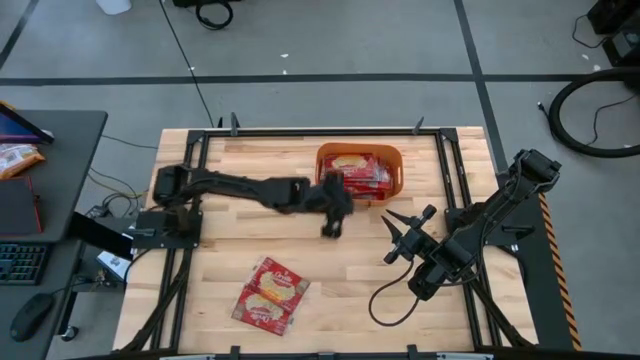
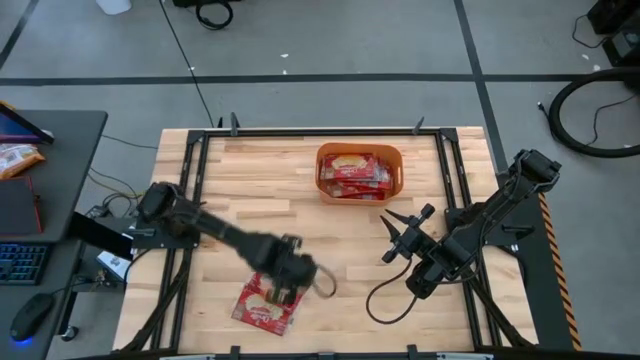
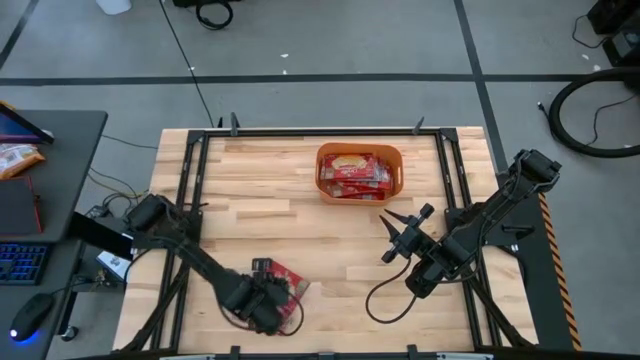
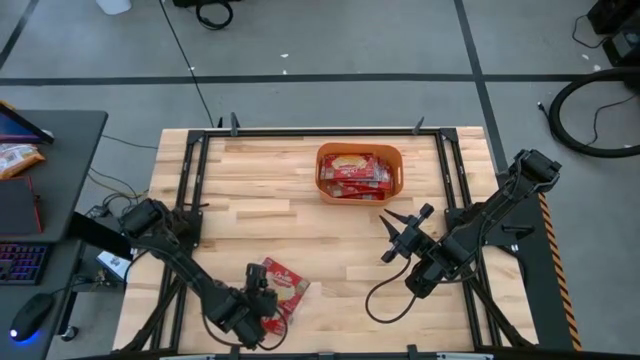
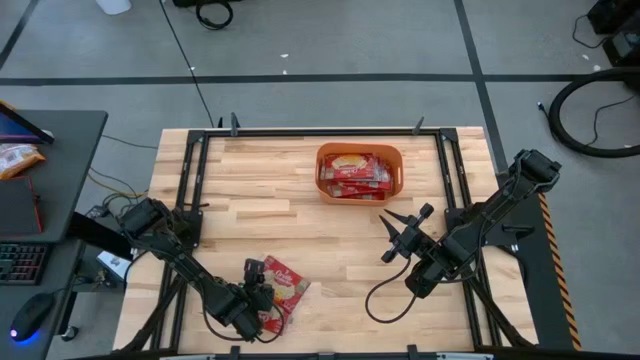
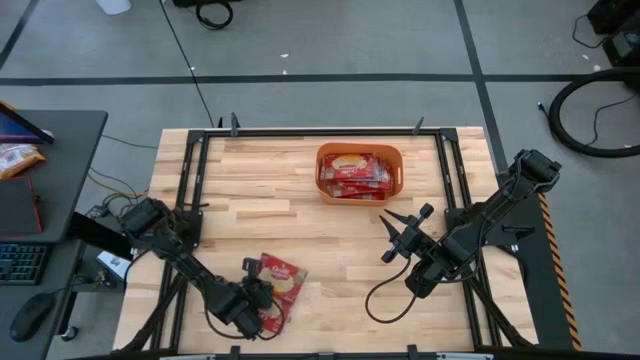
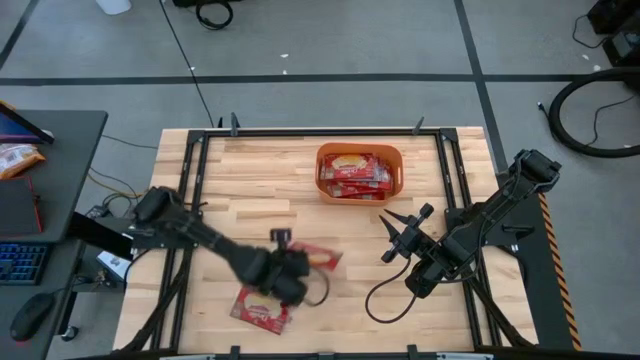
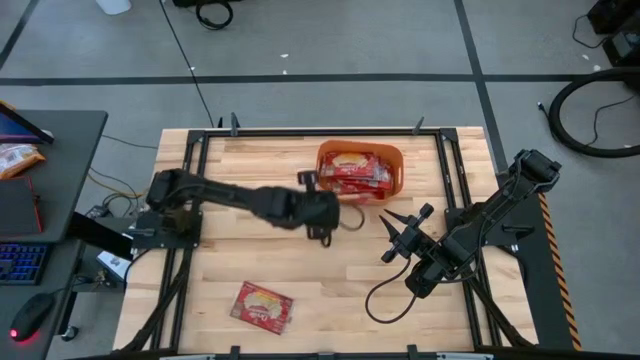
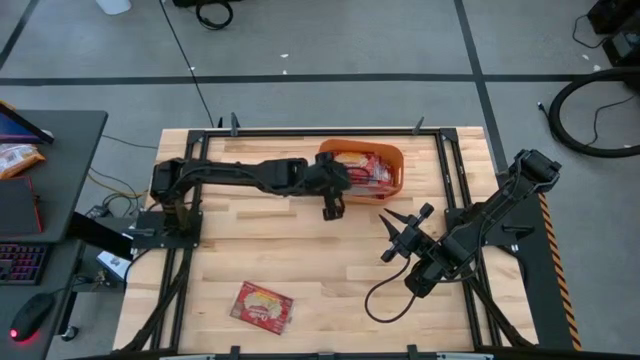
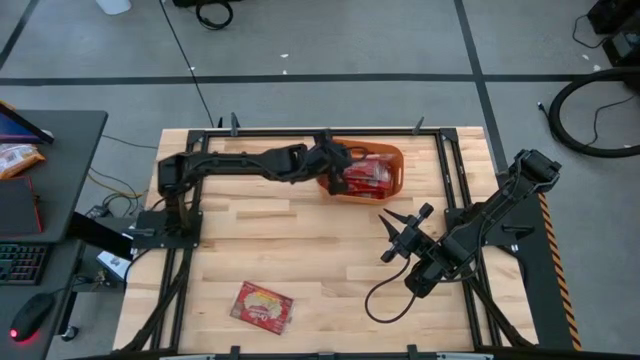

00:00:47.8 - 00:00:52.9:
Task: Sort popcorn bags into baskets
Put the red popcorn bag into the orange bin

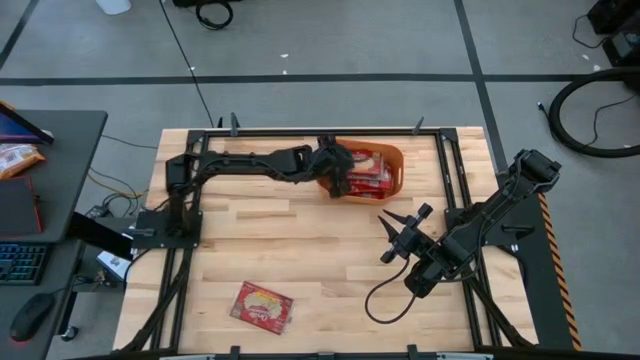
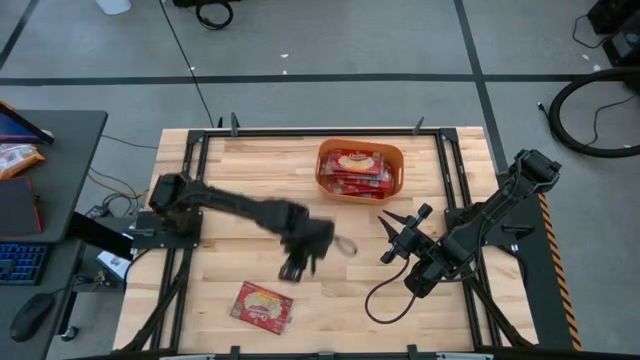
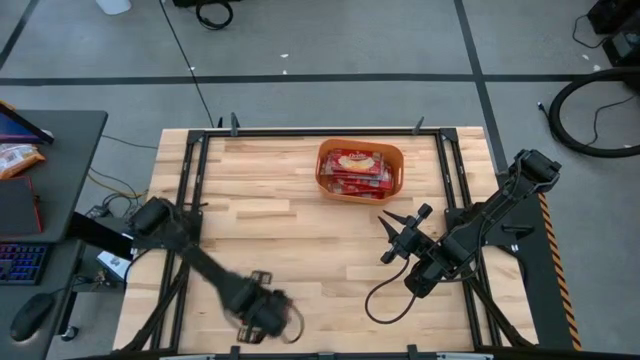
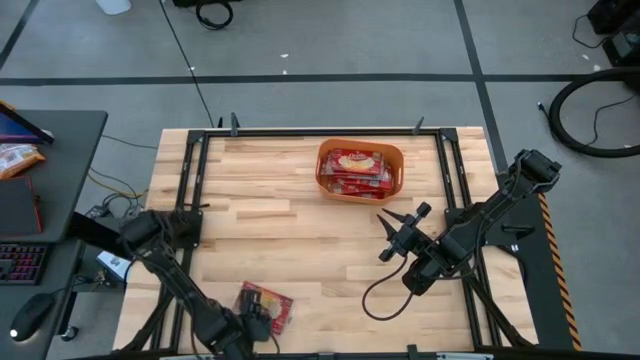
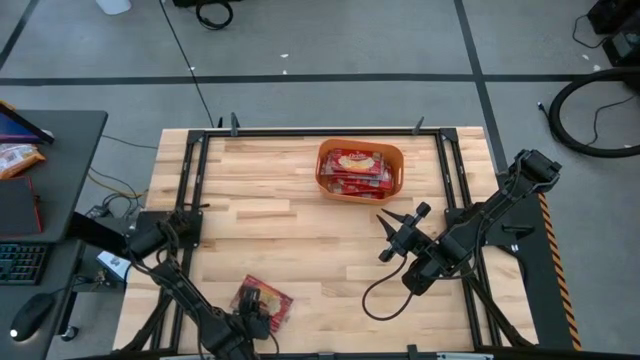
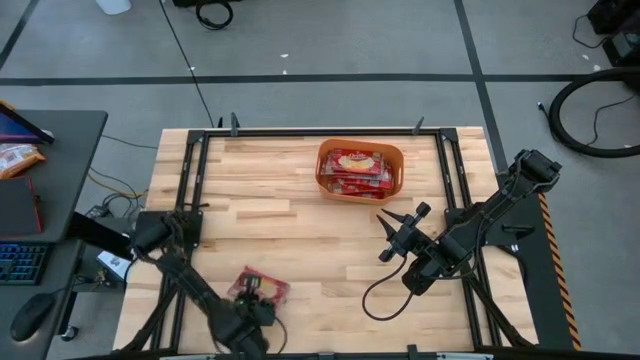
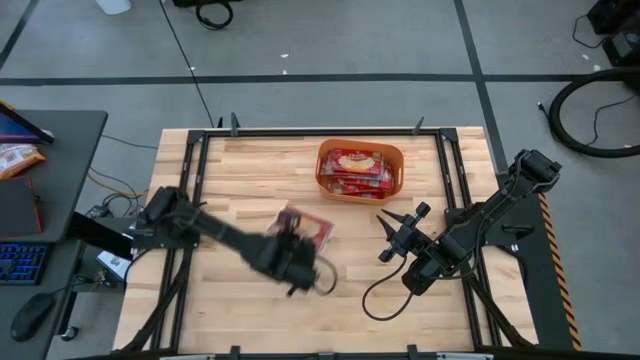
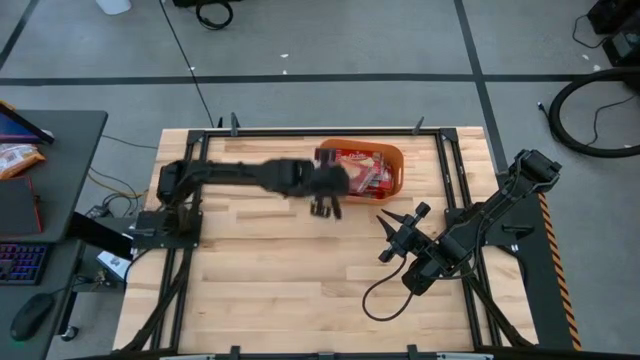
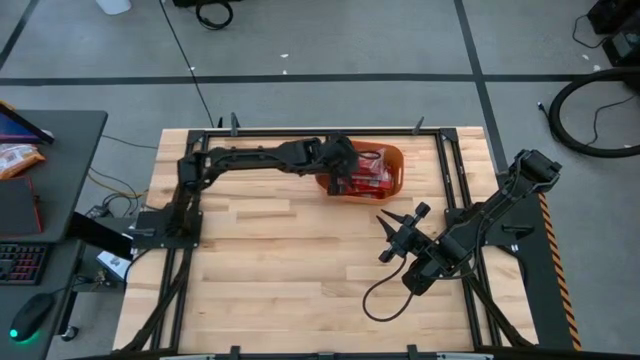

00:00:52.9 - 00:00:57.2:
Put the red popcorn bag into the orange bin

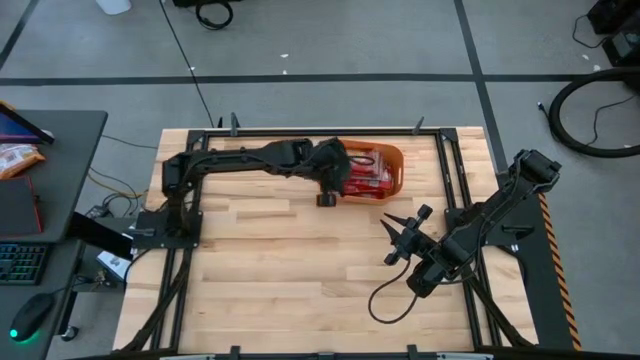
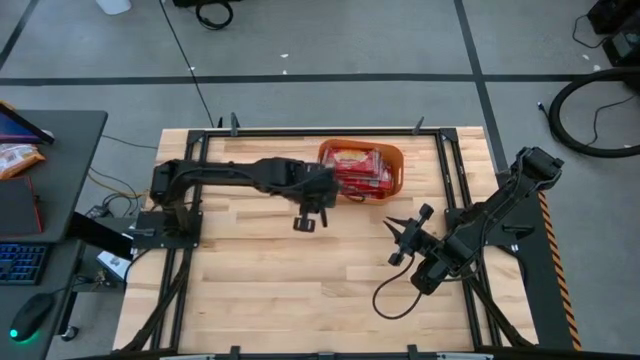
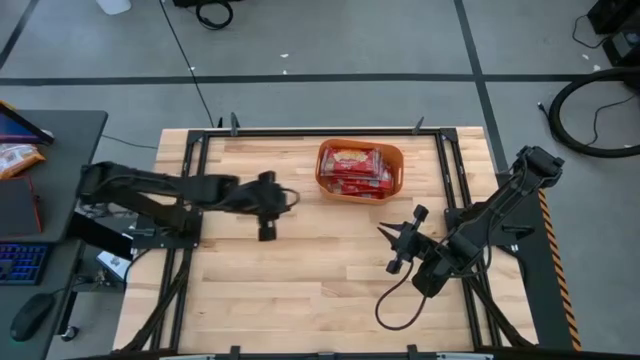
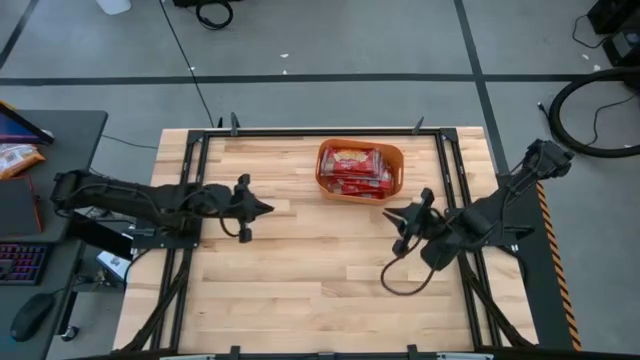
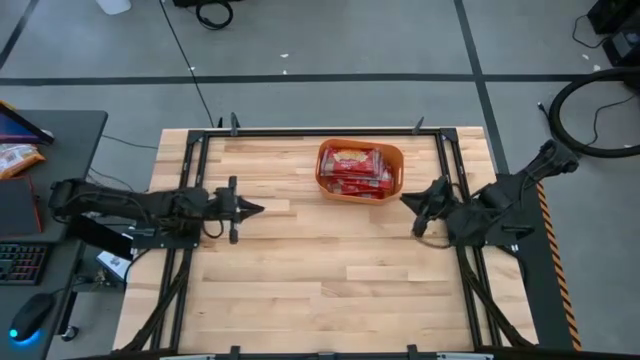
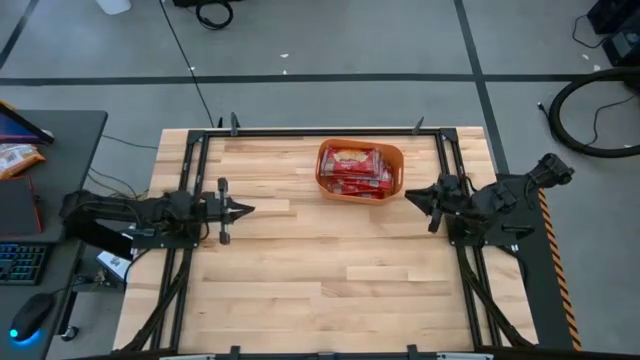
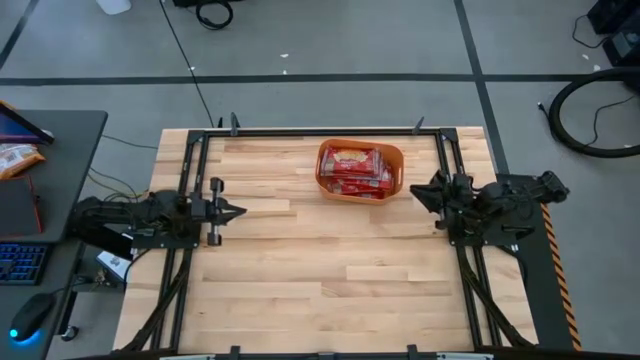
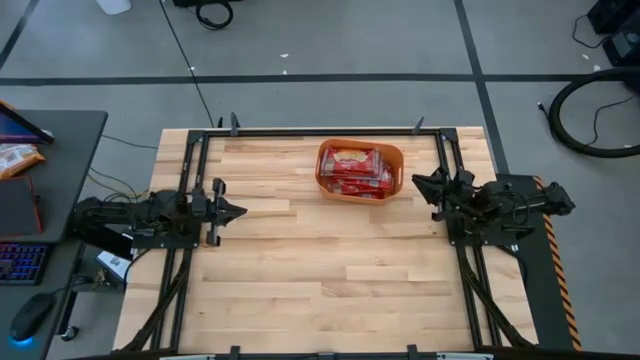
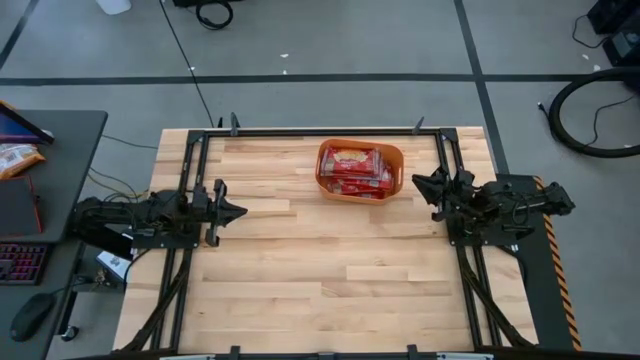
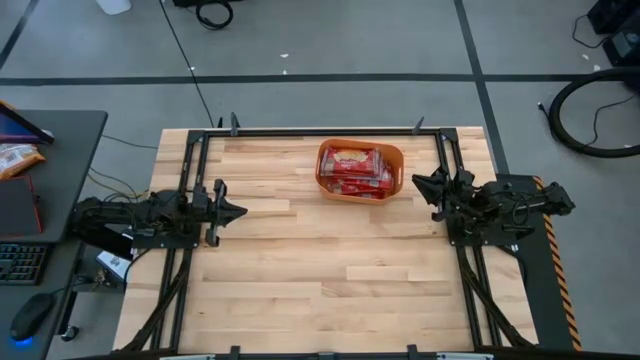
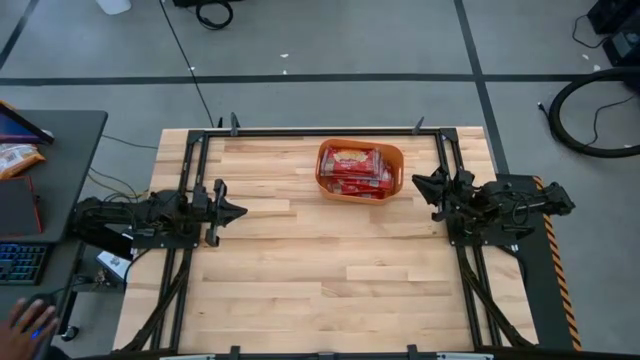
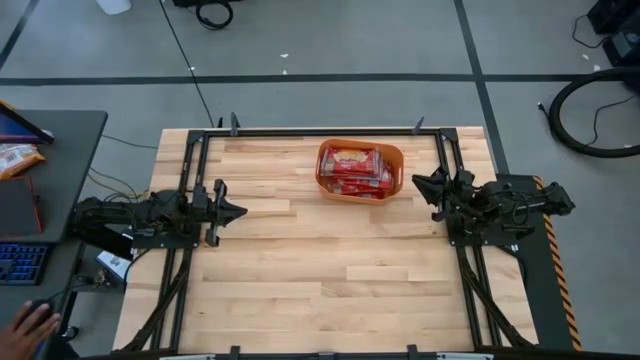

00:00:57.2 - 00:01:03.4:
Return to Home Position

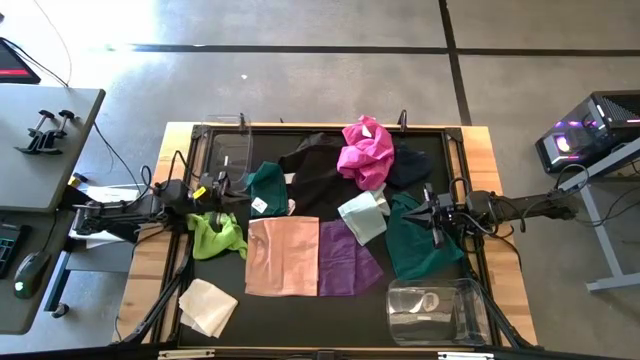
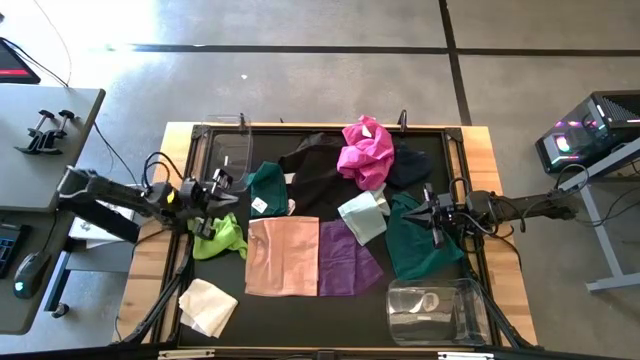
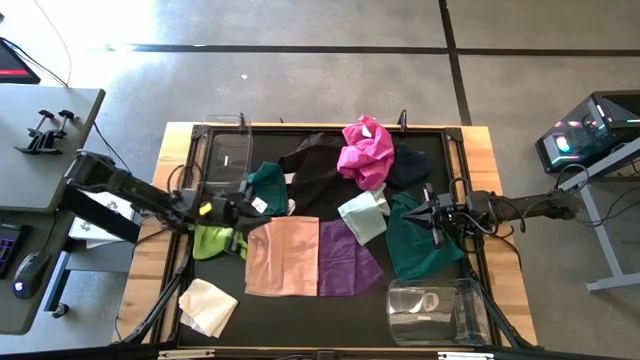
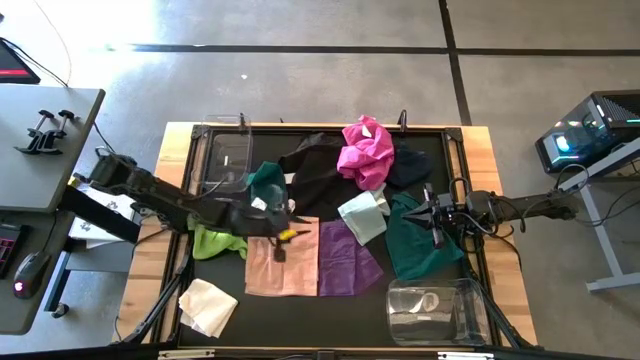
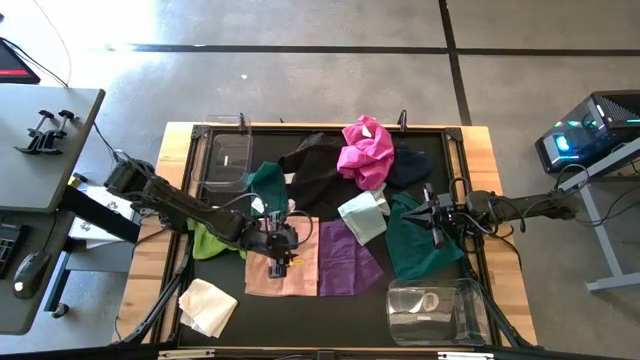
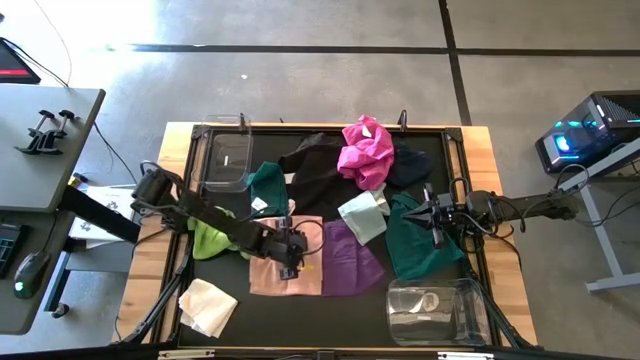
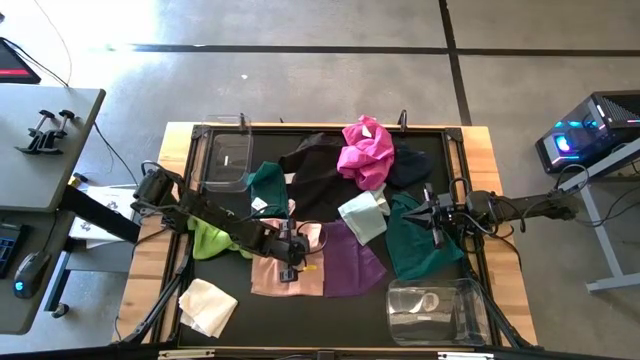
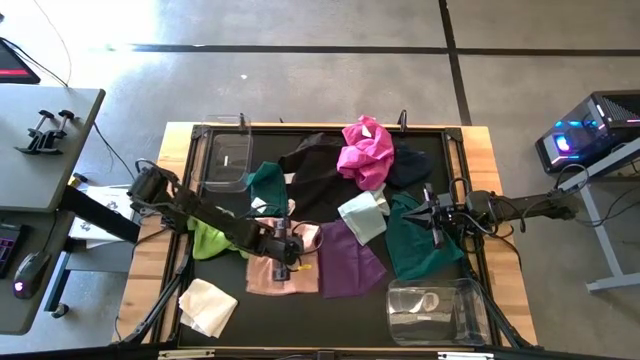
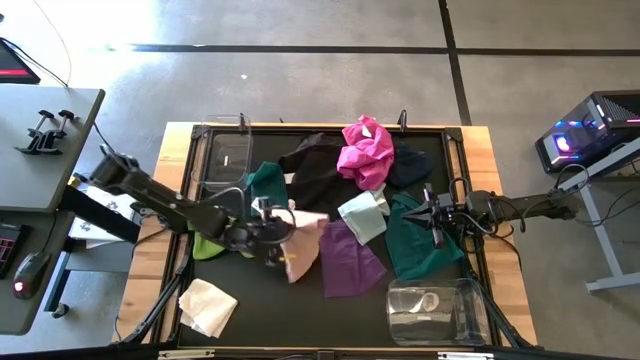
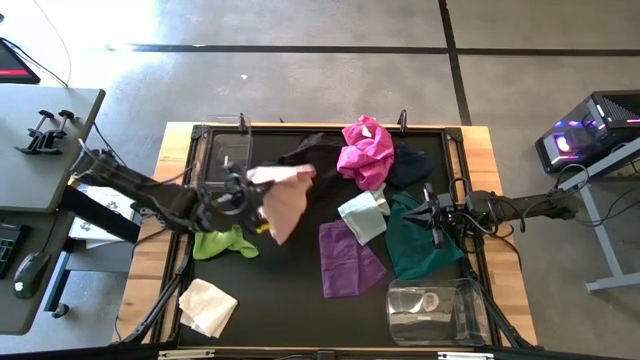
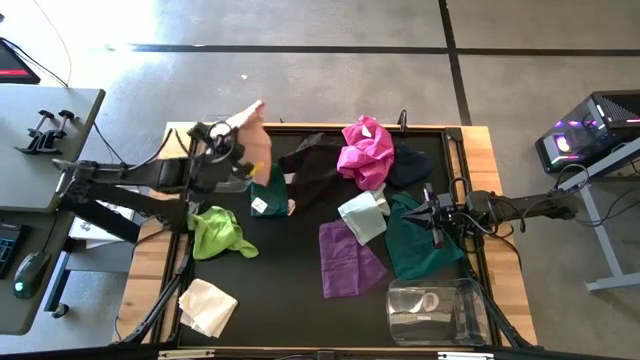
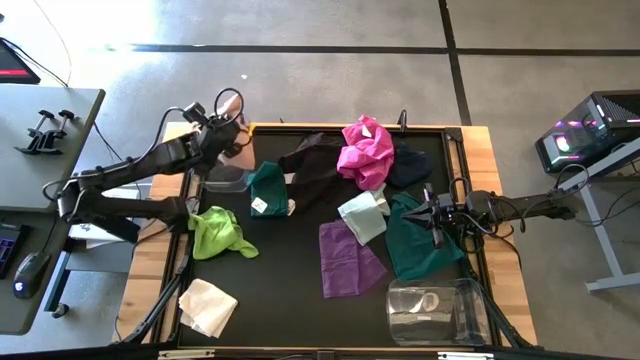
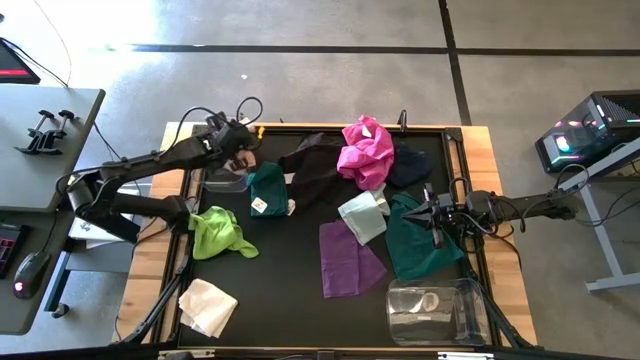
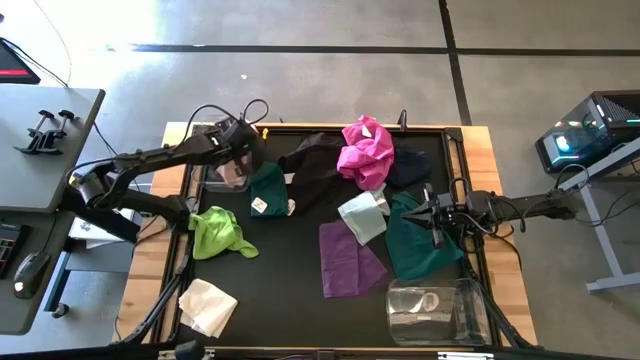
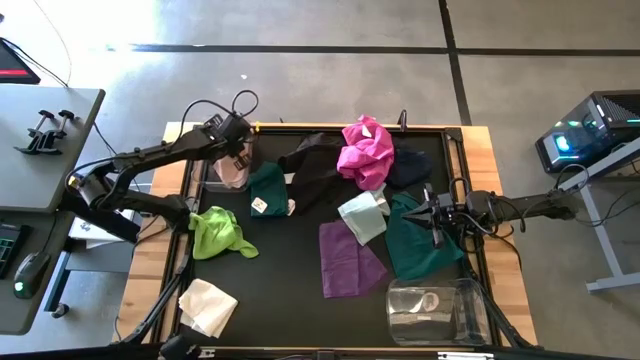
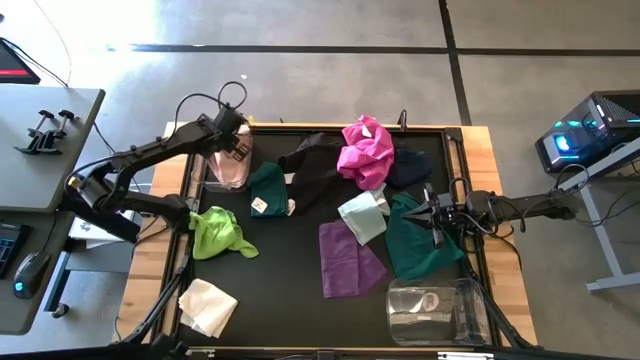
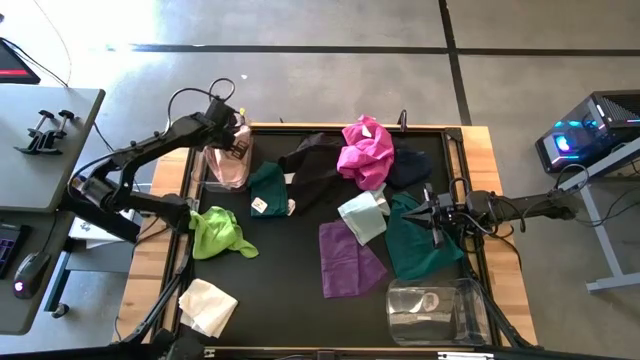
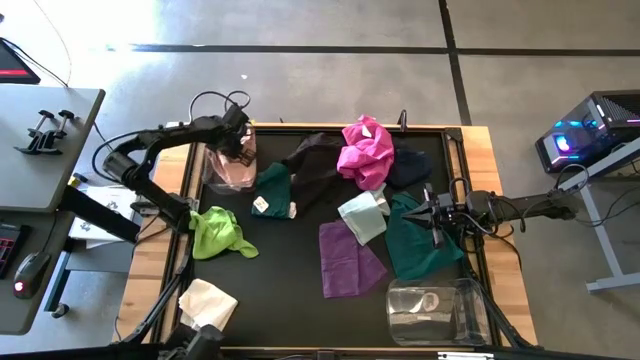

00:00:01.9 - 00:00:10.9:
Task: Sort towels by color in basket
Put the light orange towel into the top transparent bin
